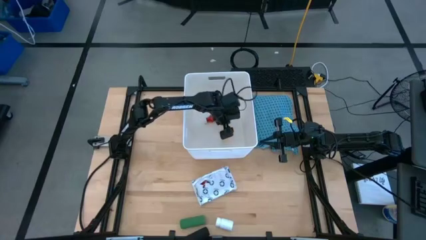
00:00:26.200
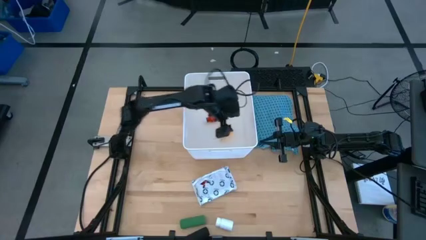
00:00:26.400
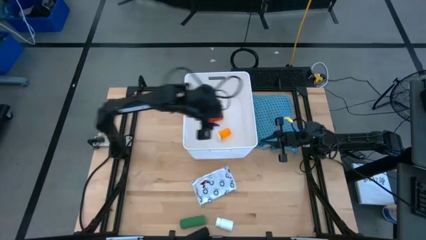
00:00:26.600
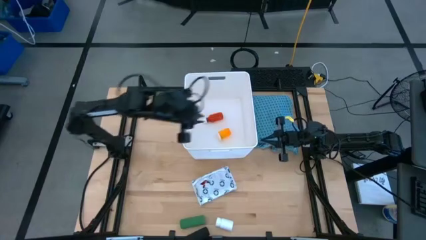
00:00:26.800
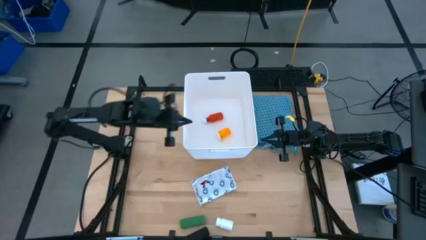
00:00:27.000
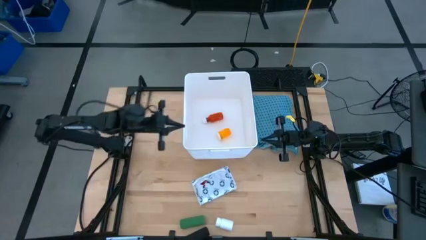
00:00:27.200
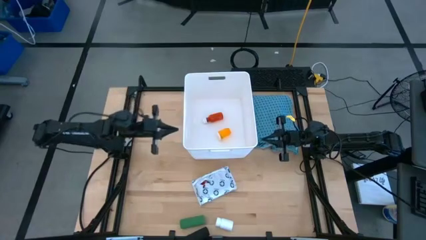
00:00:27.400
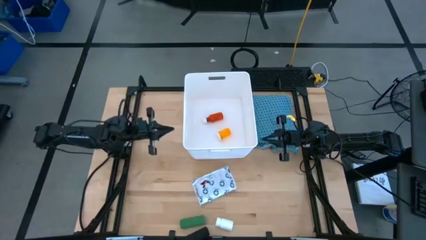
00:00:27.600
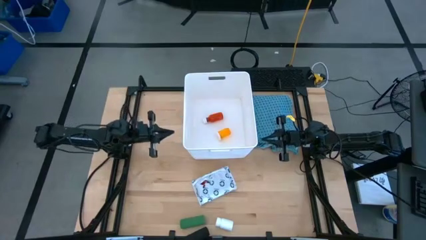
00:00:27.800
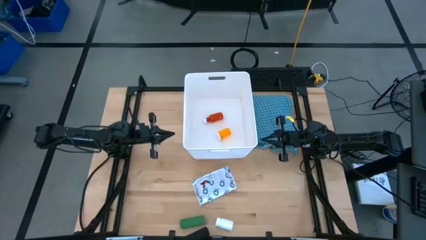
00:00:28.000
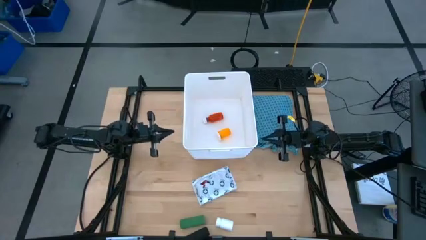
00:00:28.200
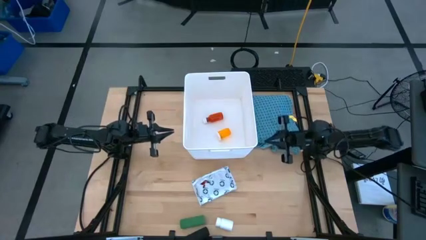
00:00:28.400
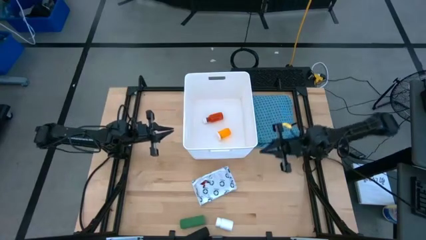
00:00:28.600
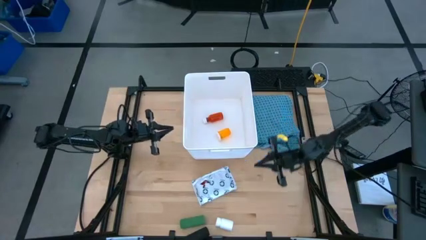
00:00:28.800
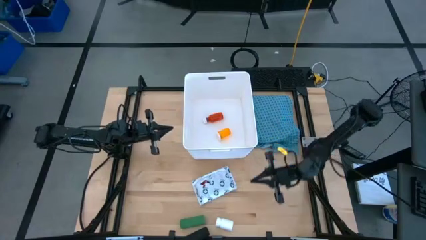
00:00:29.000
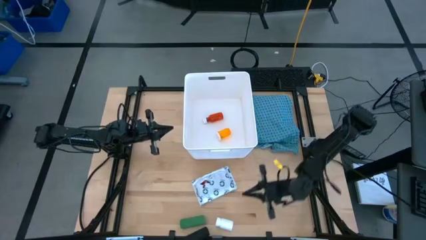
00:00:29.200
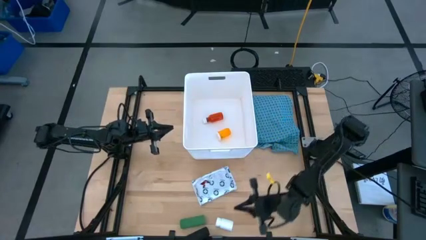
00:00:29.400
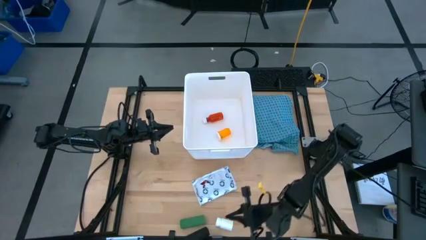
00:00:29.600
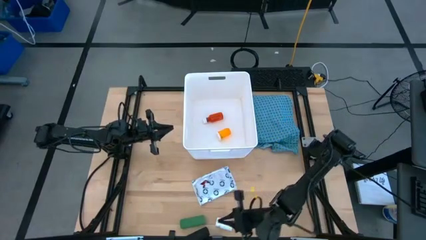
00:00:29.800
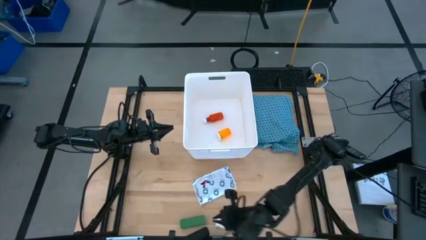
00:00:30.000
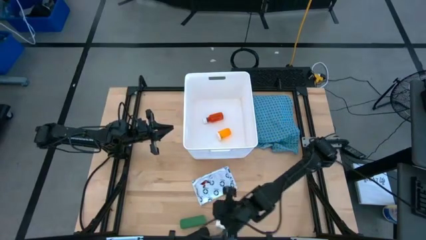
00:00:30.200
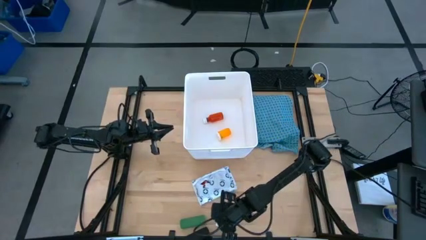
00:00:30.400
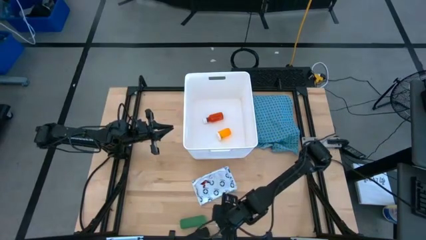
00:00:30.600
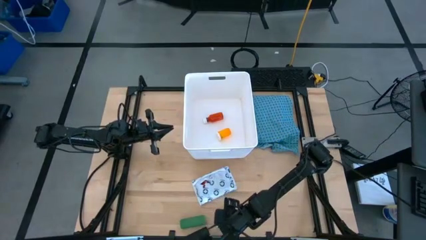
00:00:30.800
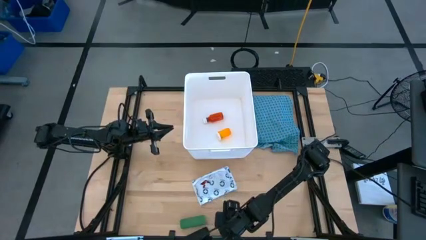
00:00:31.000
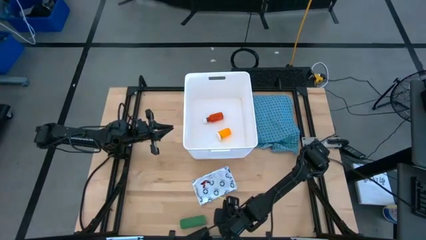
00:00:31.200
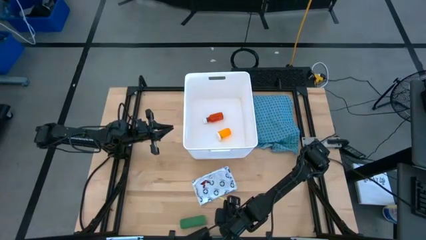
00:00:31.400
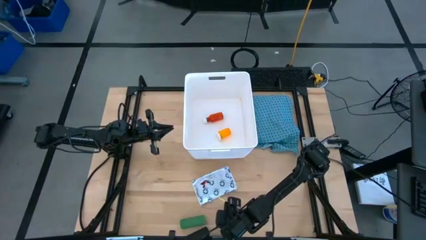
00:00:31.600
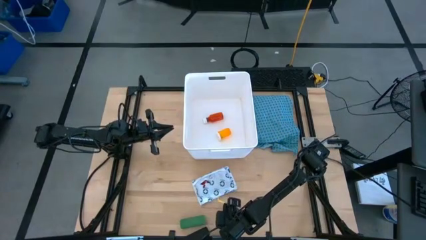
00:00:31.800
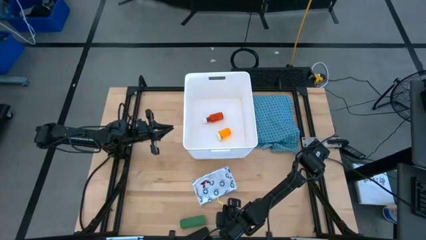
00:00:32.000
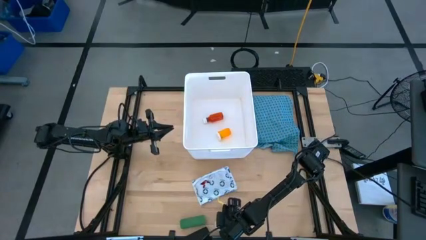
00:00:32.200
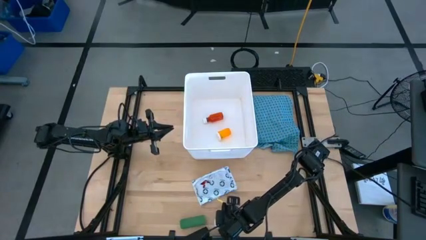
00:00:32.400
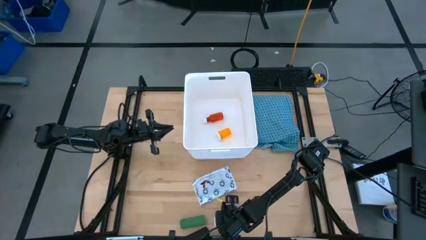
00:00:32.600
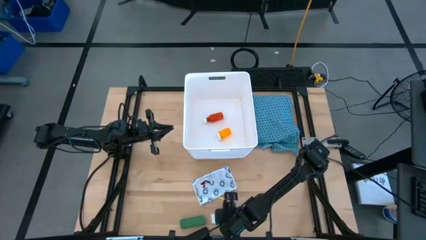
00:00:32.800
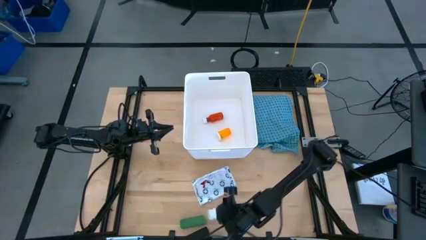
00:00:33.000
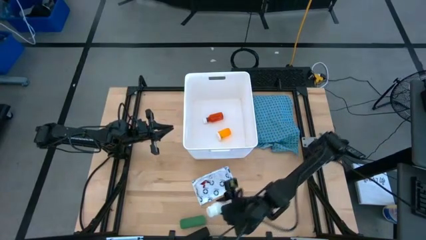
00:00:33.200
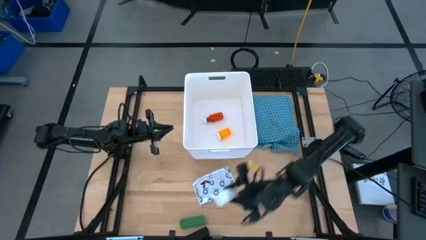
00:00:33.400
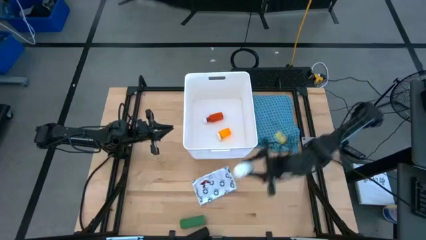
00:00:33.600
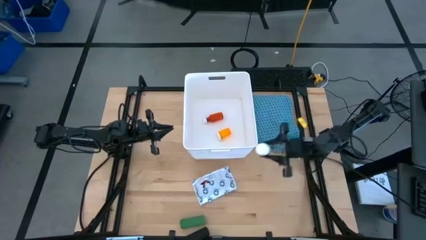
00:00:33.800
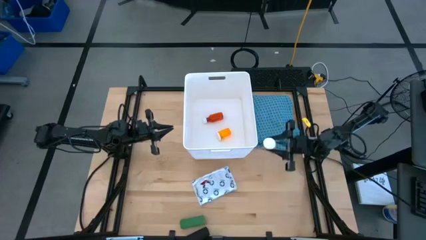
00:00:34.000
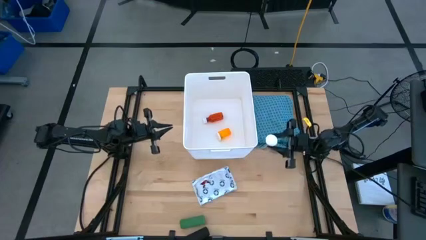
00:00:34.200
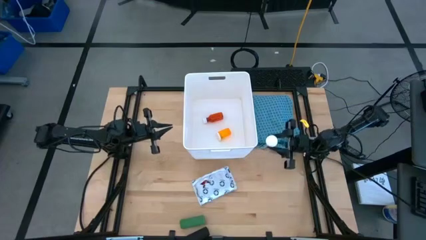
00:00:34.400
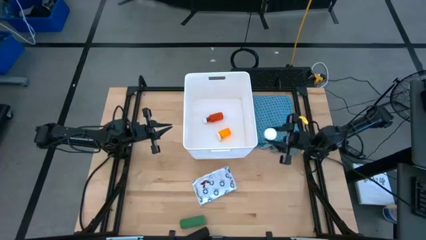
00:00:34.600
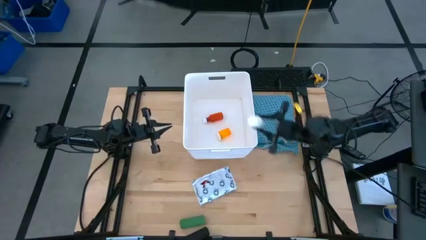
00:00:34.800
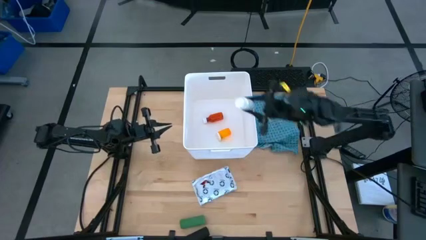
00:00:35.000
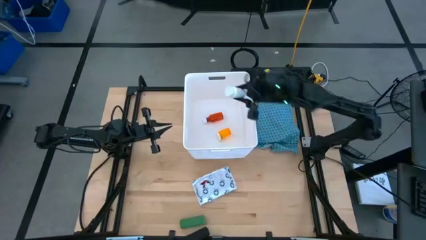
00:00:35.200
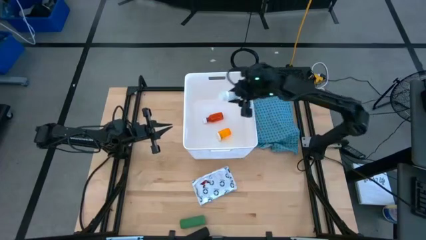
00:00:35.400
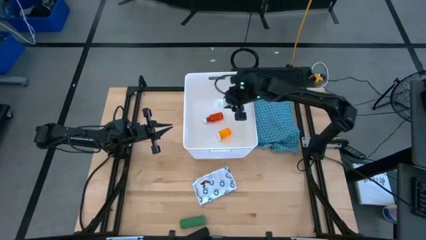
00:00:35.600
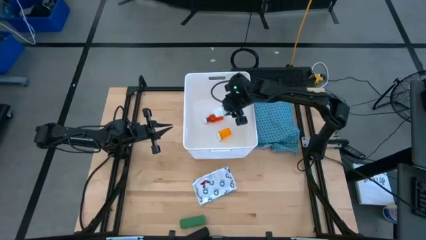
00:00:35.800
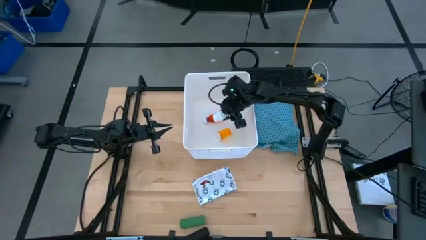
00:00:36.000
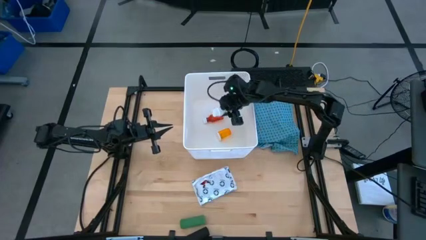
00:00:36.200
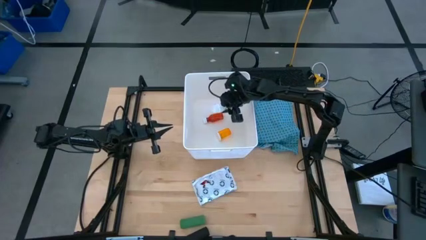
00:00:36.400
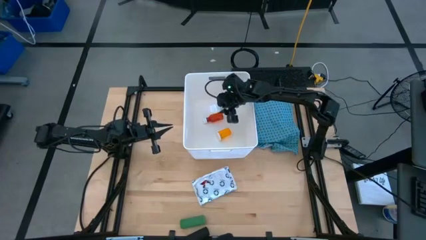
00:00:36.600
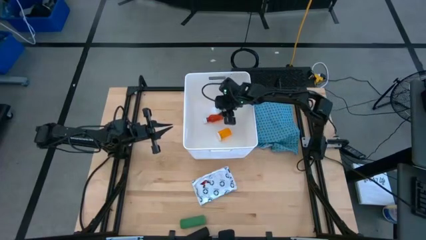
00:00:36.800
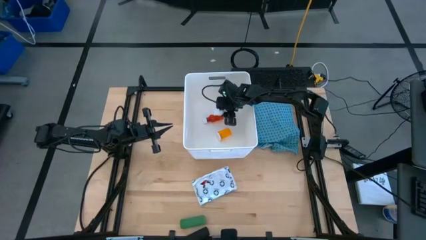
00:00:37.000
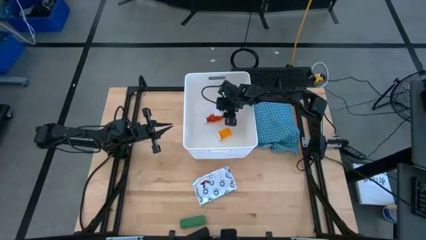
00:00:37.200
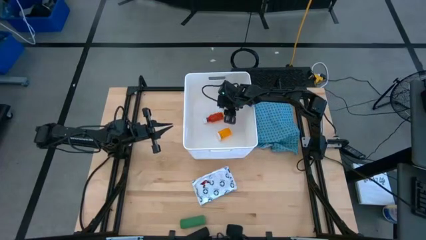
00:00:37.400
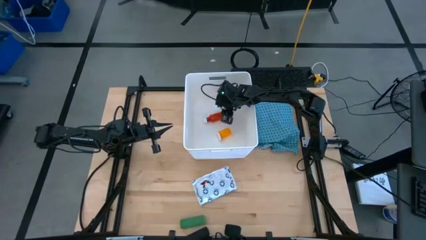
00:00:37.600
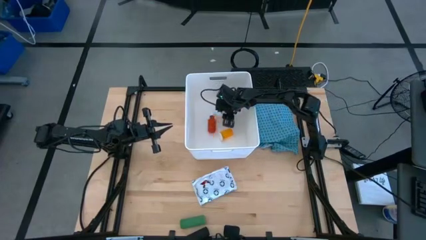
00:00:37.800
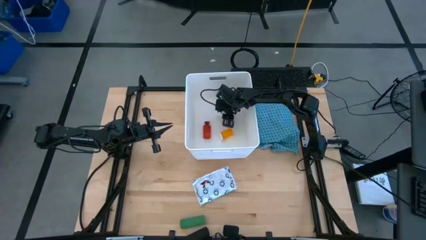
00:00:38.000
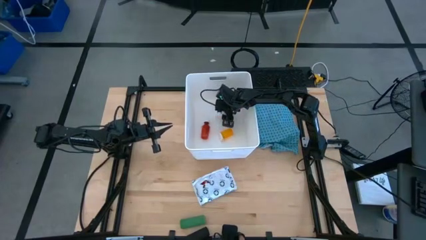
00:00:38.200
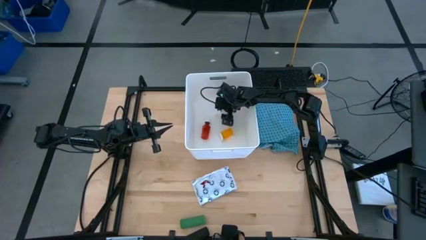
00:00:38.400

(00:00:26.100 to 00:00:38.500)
Task: Pick & place medical supplies in basket/bin
Put the white medicine bottle into the white bin

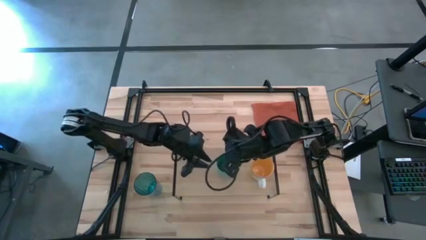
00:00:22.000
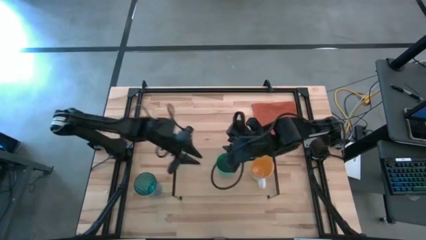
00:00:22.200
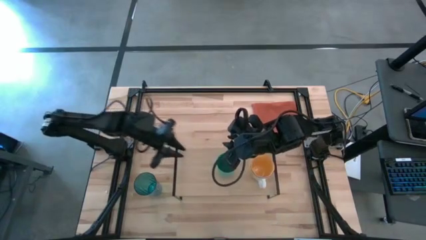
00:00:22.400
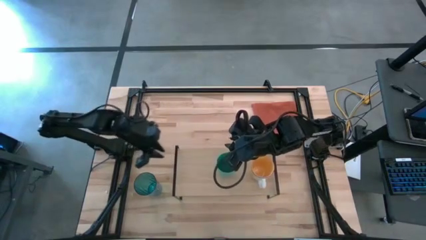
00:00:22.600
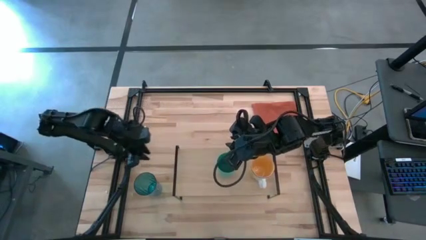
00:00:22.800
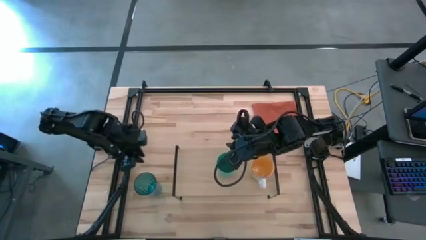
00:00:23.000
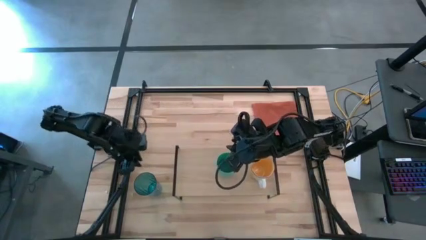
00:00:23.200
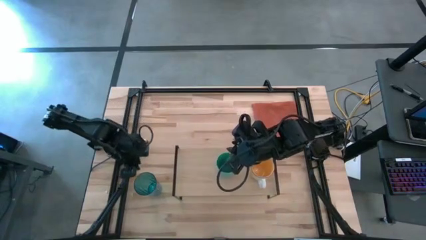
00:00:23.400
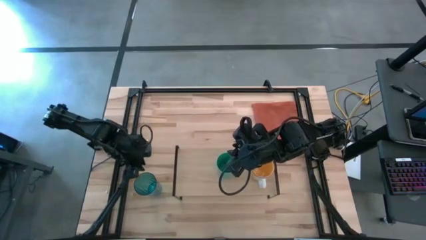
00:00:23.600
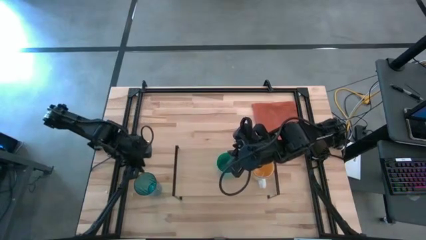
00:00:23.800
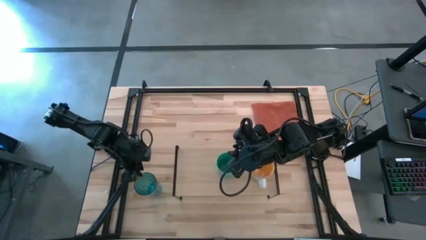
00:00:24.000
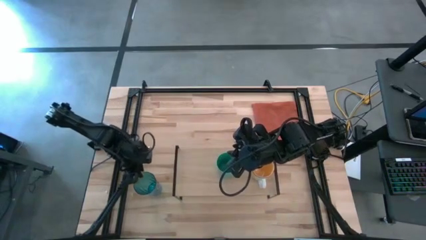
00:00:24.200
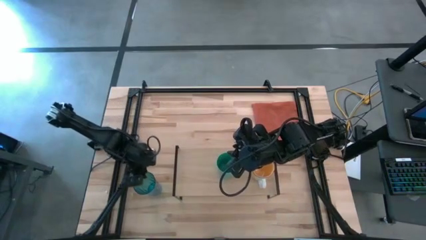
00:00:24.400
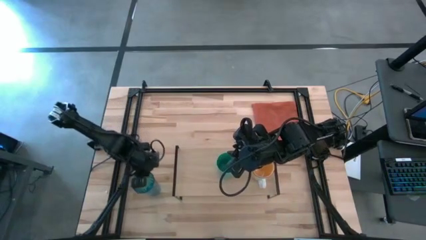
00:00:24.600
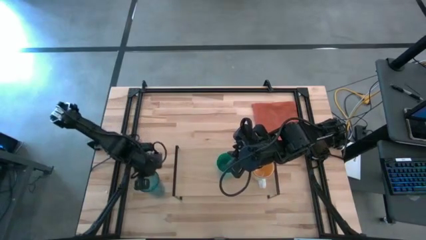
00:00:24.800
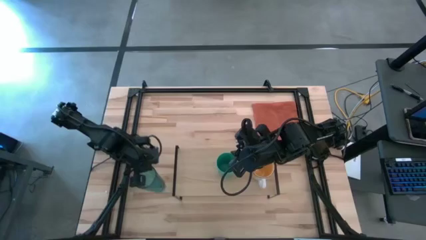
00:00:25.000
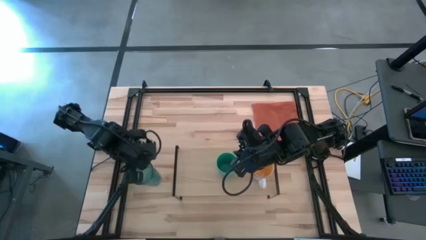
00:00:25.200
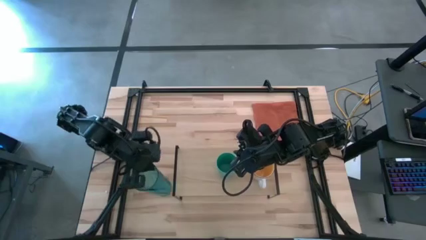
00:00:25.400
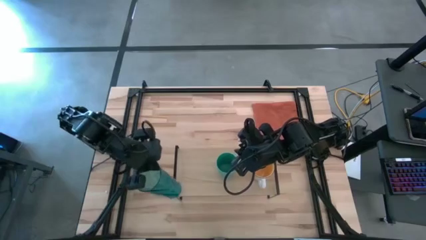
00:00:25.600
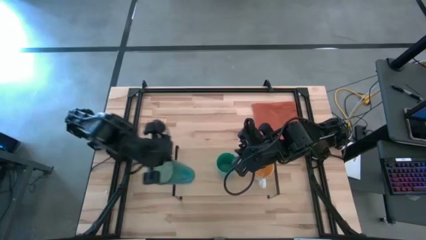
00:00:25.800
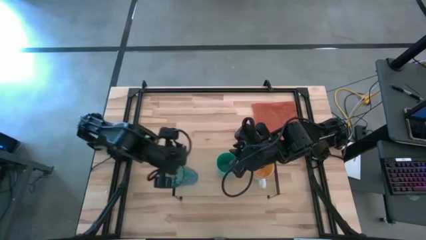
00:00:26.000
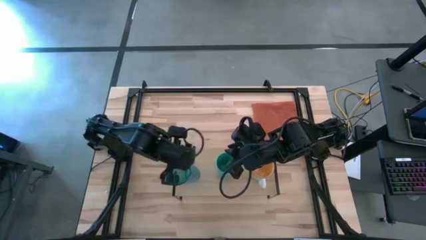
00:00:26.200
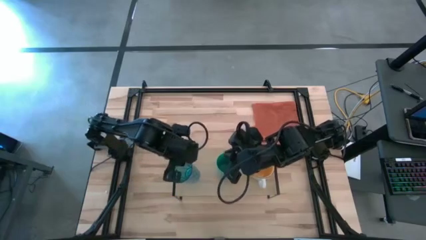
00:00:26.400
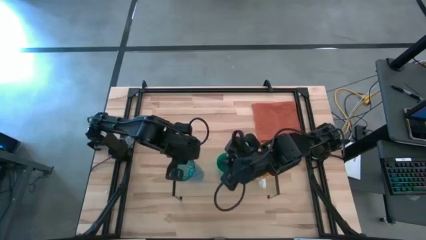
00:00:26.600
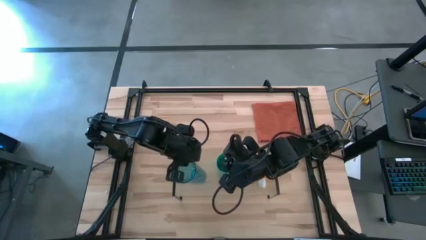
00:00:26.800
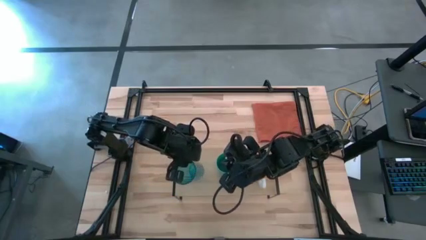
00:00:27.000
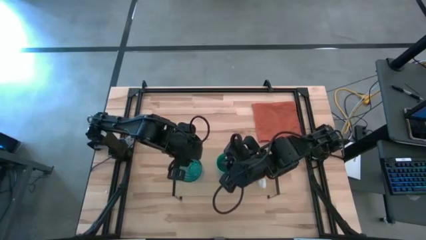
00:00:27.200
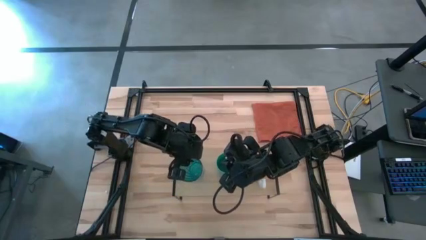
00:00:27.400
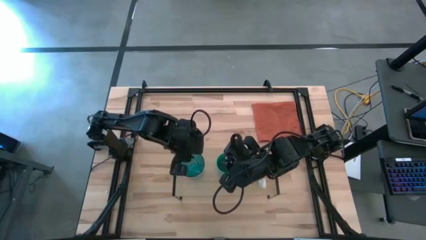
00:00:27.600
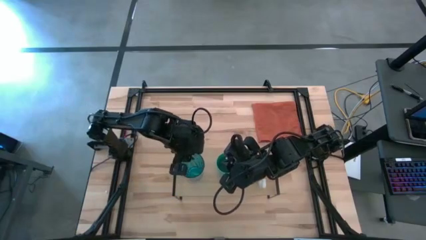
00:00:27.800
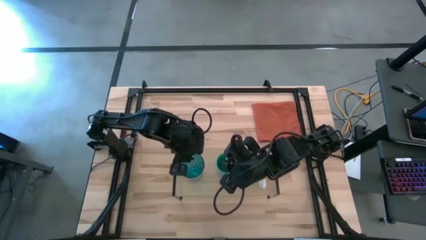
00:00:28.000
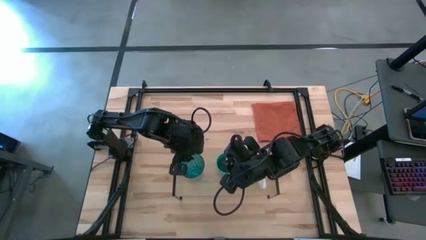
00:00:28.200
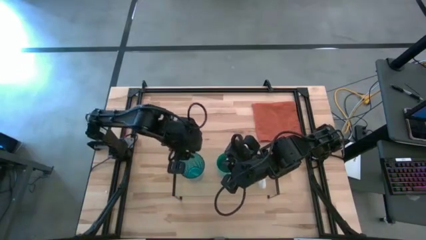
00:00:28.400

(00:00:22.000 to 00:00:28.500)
Task: Stack small to large cups/mugs on shelf
Put the blue cup on the shelf
